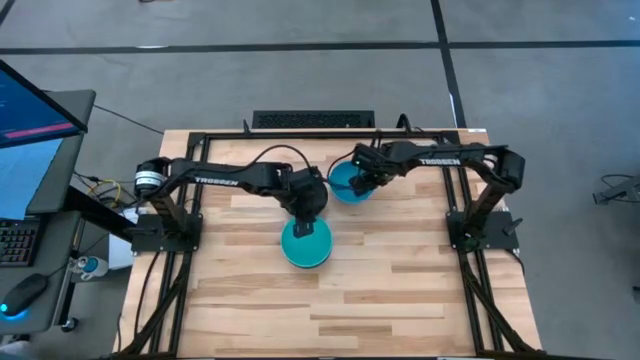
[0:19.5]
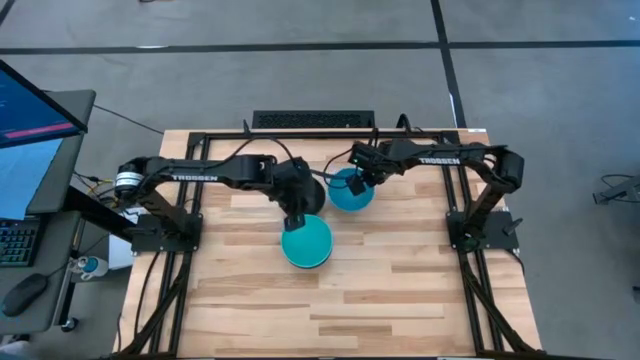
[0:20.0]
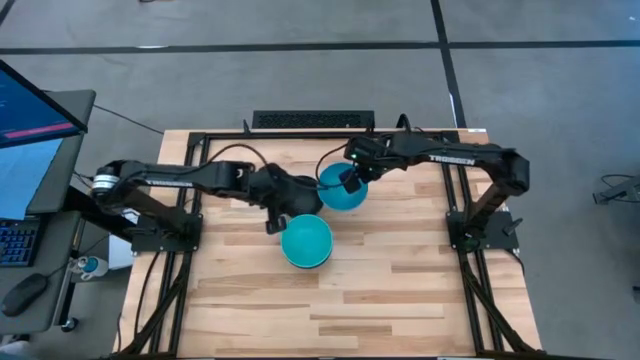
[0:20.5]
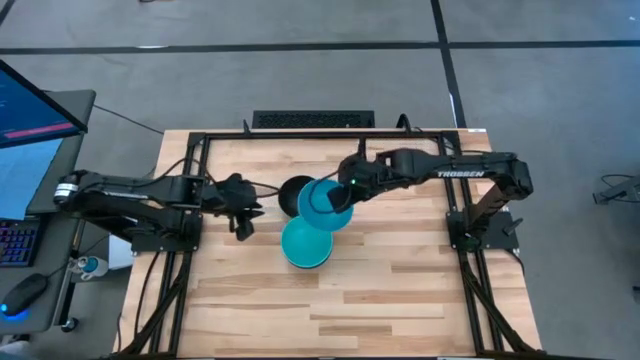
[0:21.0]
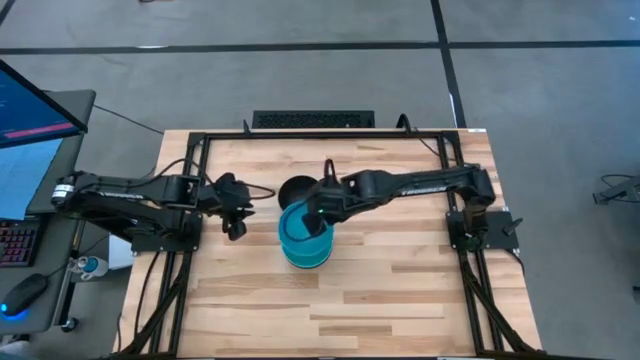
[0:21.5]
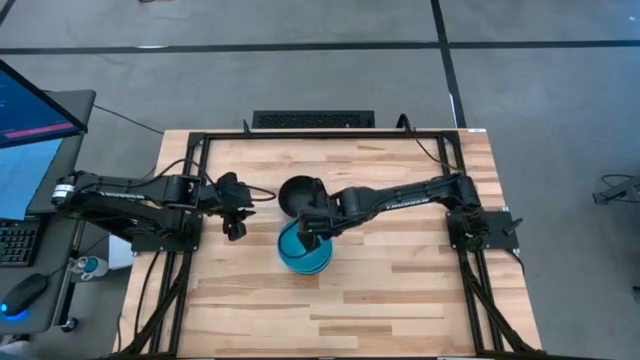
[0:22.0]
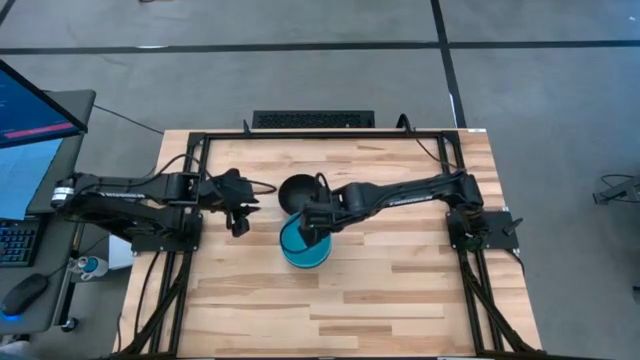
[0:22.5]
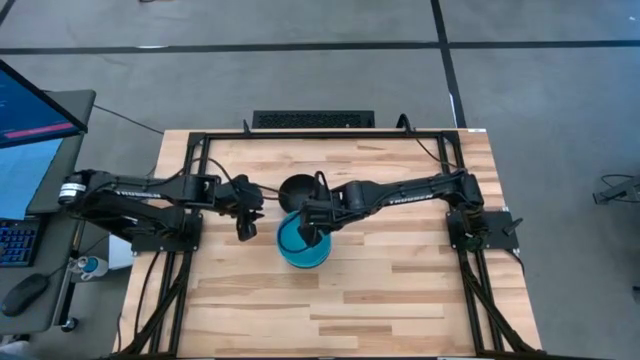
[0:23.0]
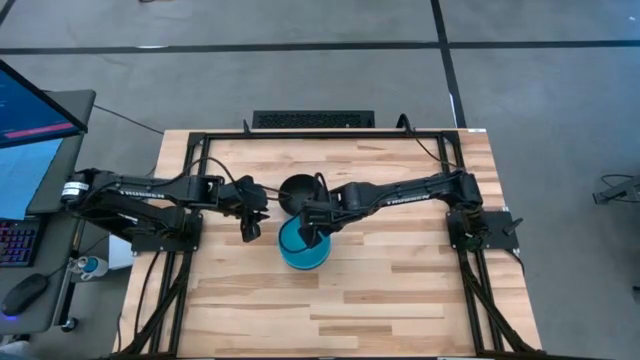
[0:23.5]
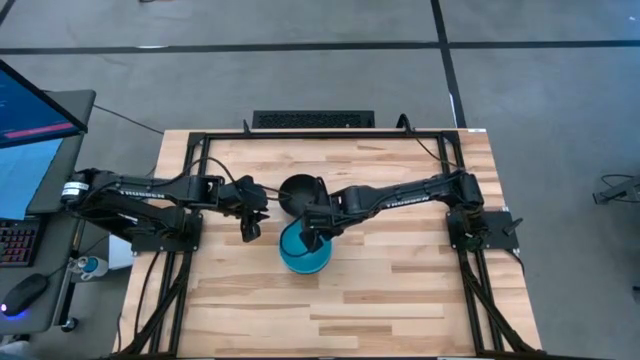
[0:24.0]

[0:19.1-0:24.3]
Task: Nest bowls inside each other
Stack the blue bowl on top of the blue bowl

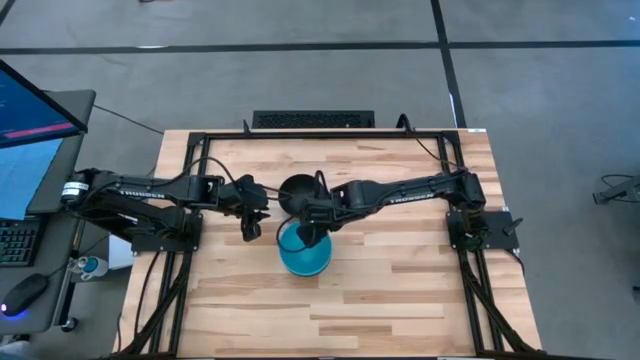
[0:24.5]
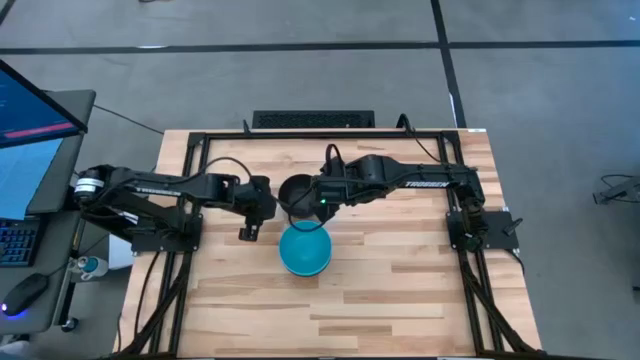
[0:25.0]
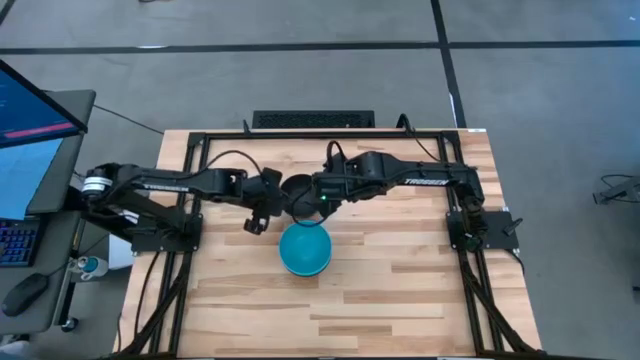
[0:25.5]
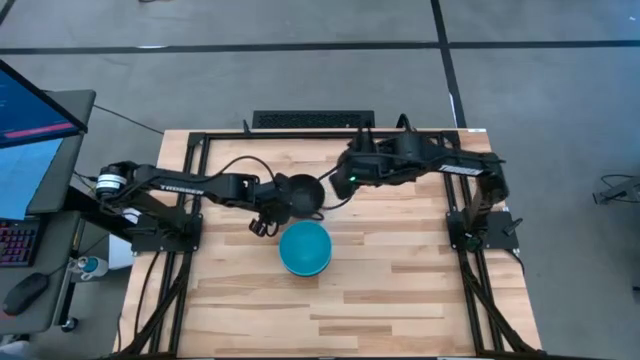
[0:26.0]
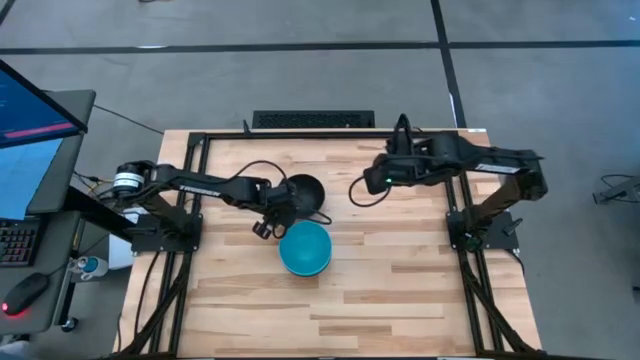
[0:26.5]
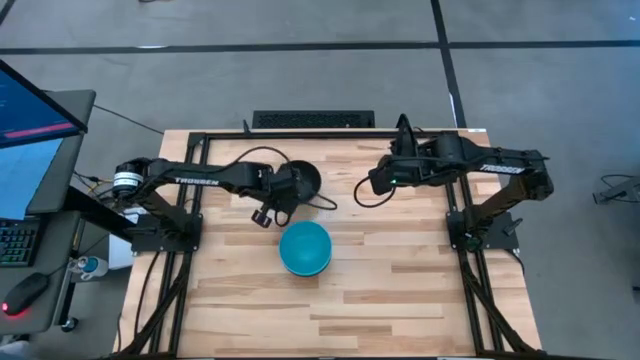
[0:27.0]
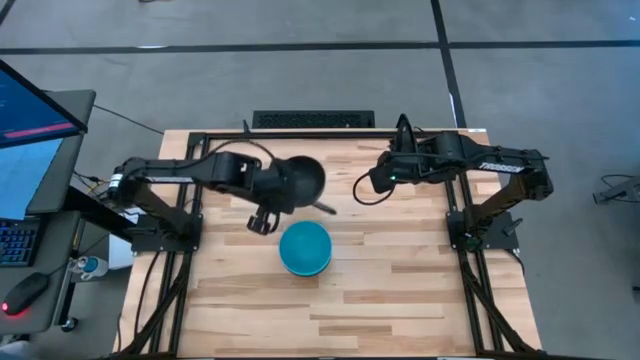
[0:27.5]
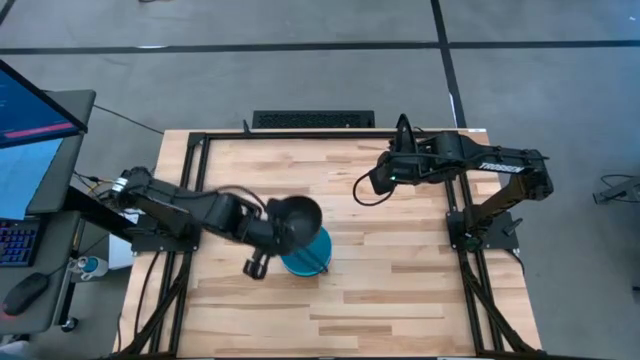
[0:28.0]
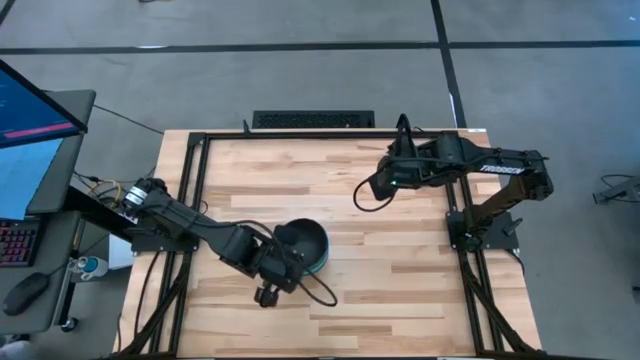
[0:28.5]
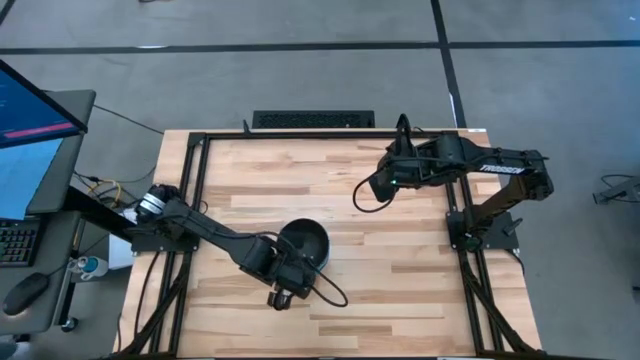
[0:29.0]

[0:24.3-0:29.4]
Stack the black bowl on top of the blue bowl

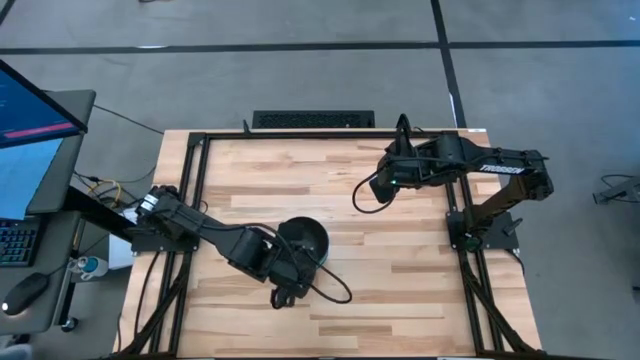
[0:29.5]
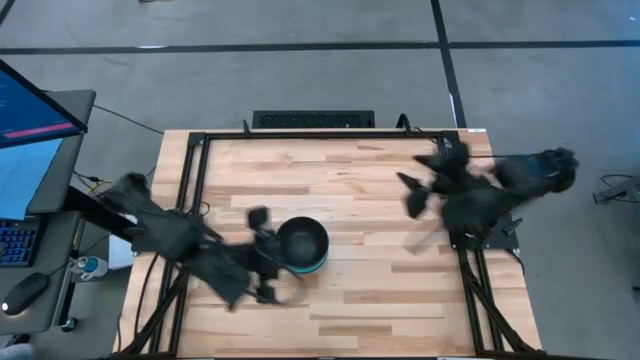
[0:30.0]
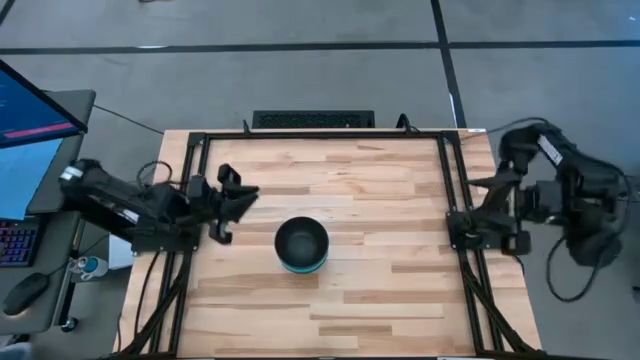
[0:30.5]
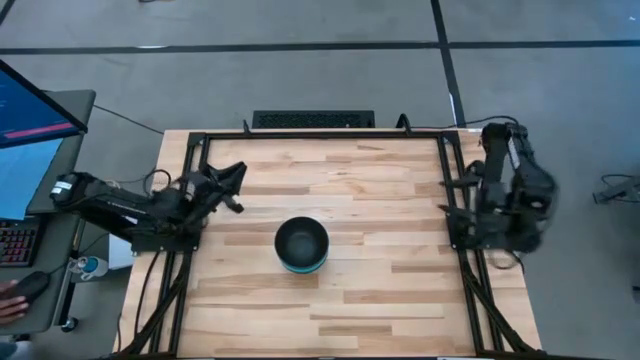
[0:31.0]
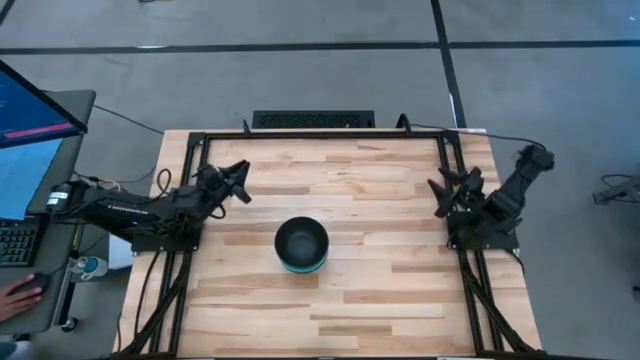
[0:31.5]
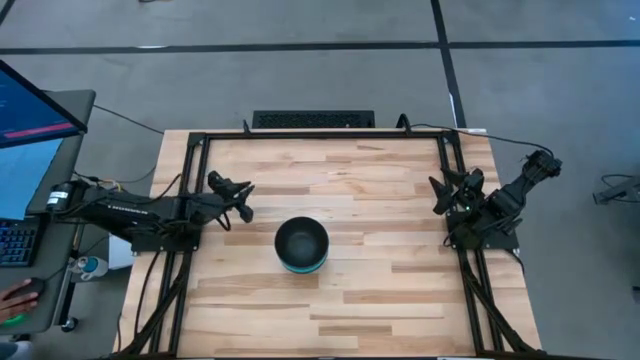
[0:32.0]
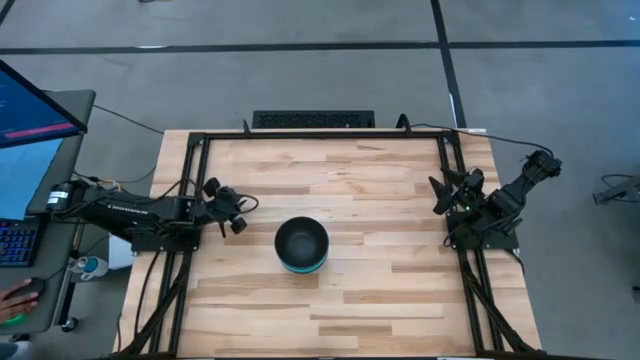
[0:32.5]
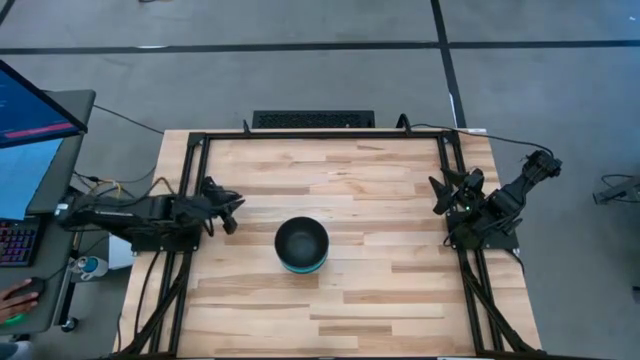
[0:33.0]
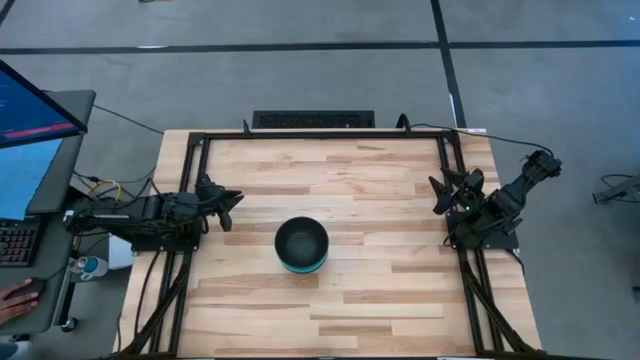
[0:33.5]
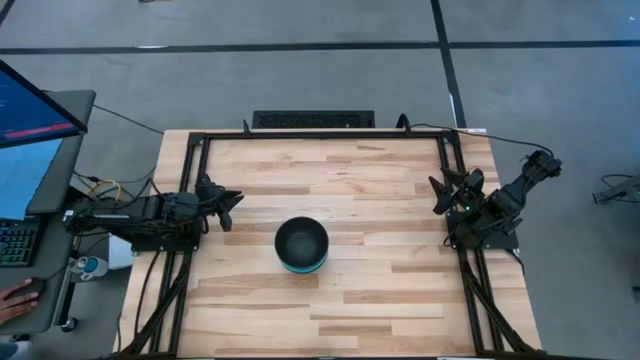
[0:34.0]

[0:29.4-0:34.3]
Return to Home Position

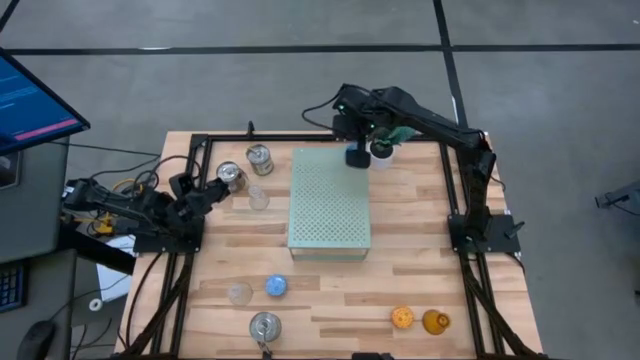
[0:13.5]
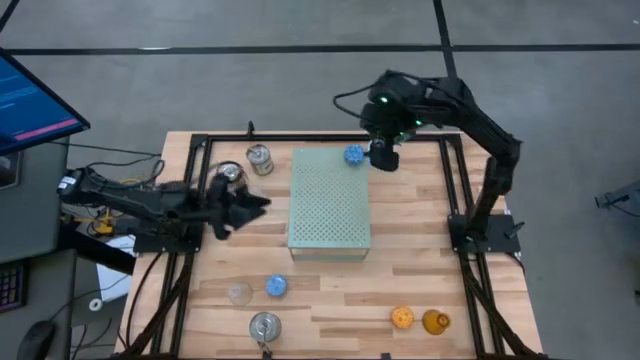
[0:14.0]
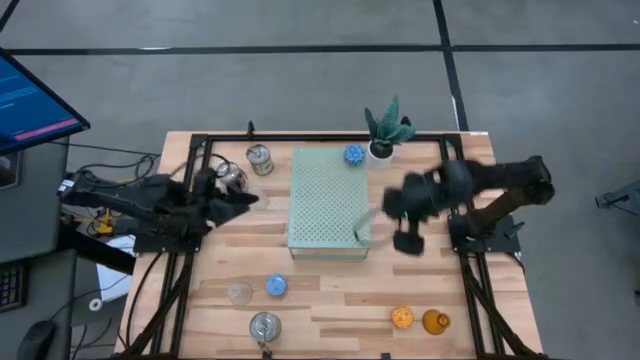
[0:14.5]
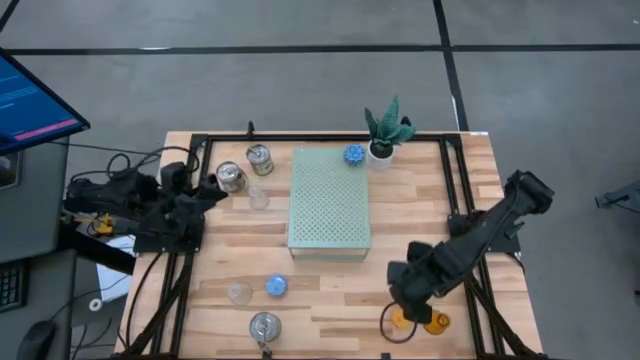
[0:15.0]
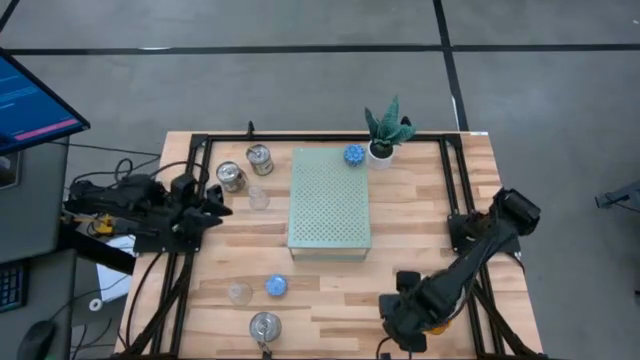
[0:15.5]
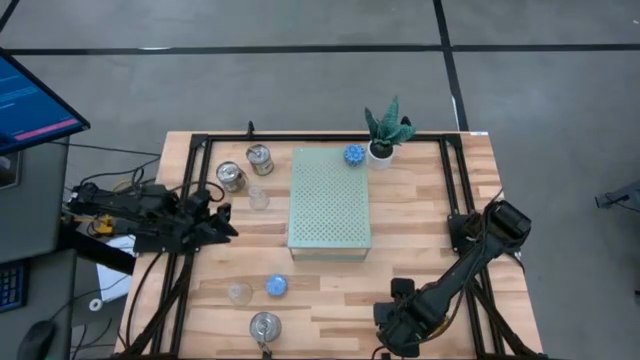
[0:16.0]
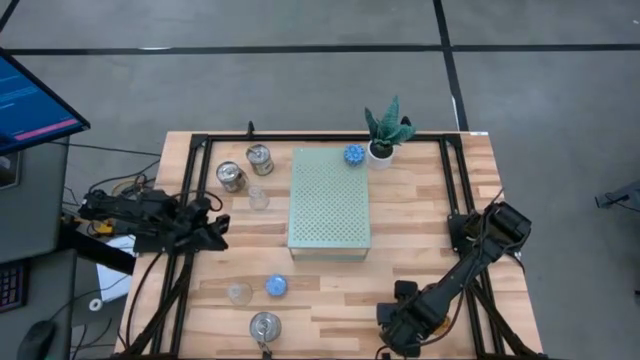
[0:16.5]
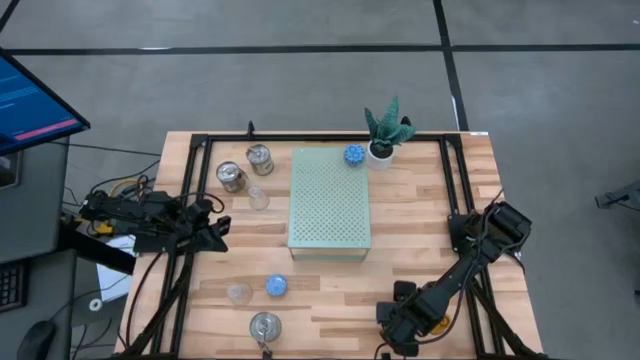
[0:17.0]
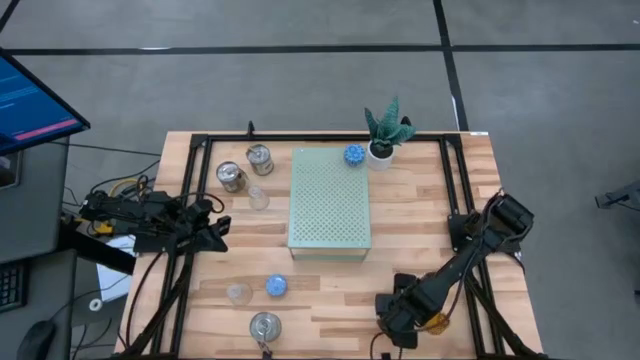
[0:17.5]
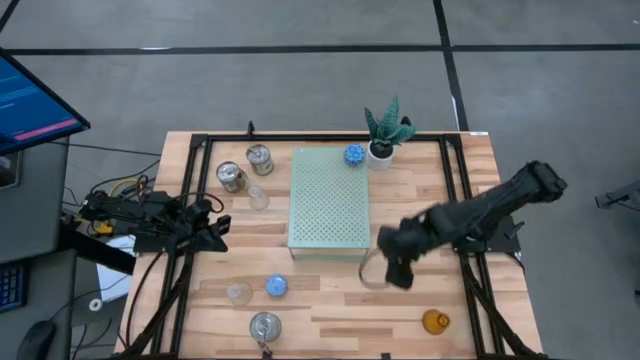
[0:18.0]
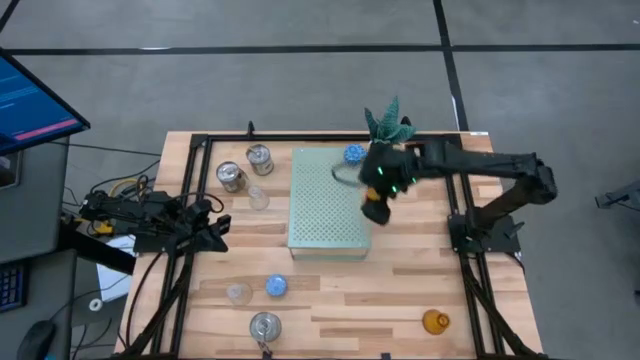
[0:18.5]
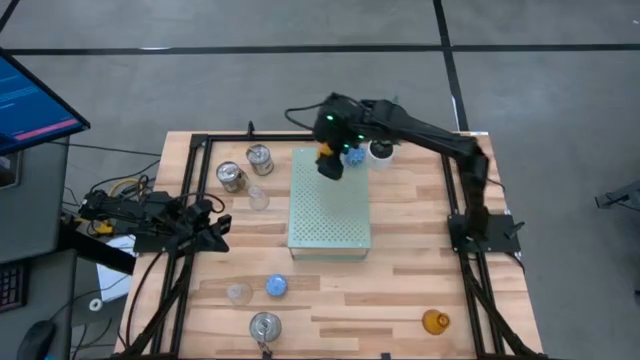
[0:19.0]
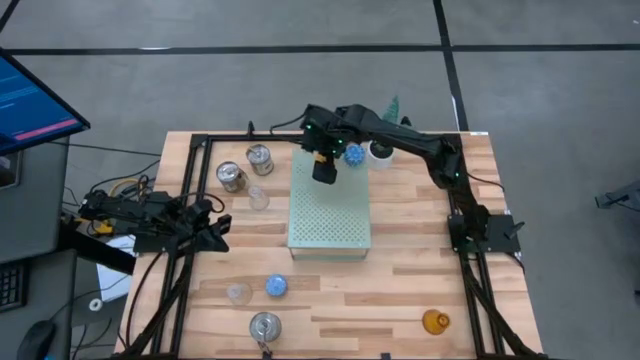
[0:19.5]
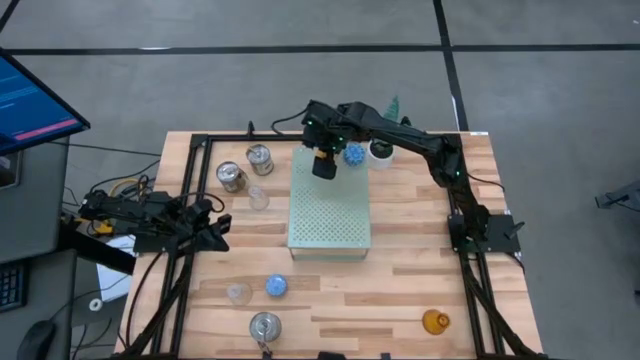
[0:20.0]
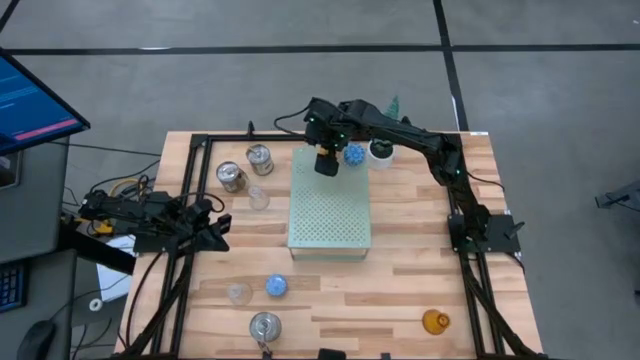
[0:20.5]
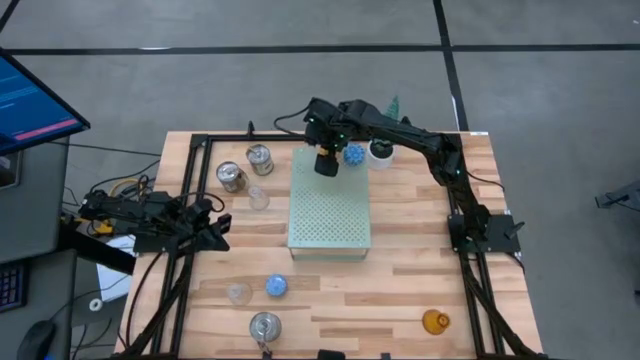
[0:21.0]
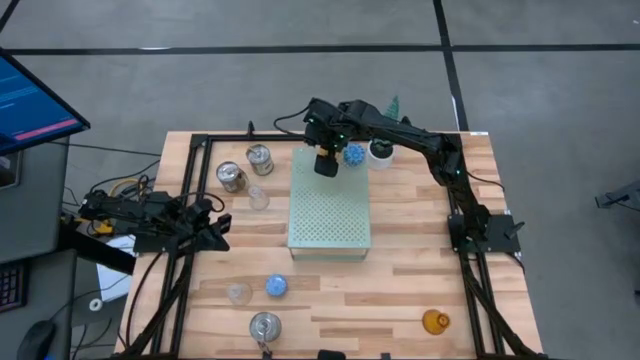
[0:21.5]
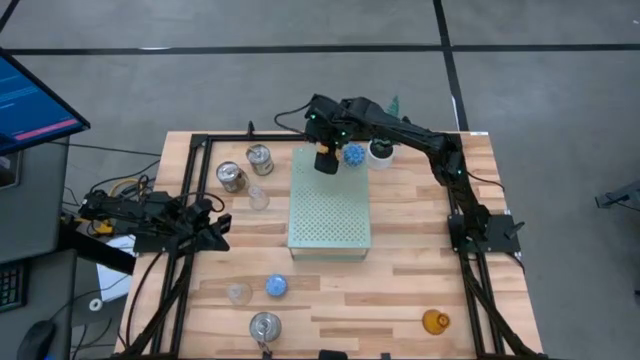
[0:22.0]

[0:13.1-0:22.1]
Task: Stock candles and holders on shelf
Put the yellow scented candle on the shelf aligned with the other scented candle
